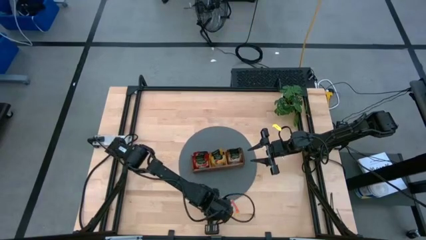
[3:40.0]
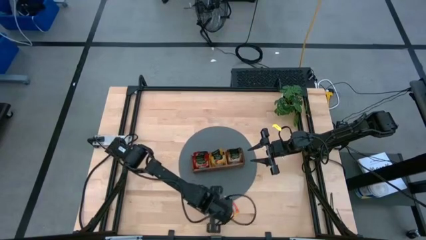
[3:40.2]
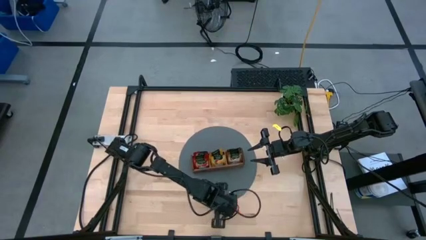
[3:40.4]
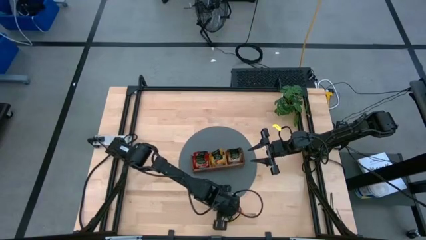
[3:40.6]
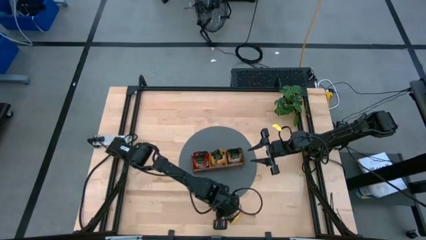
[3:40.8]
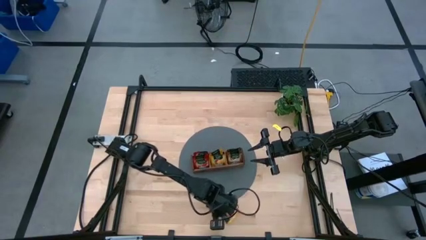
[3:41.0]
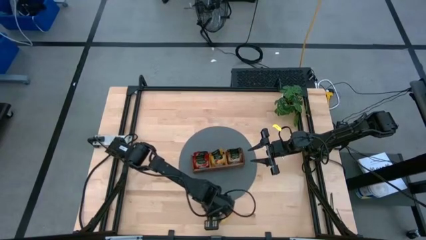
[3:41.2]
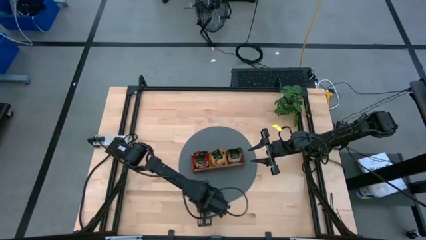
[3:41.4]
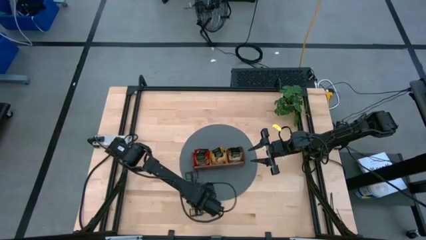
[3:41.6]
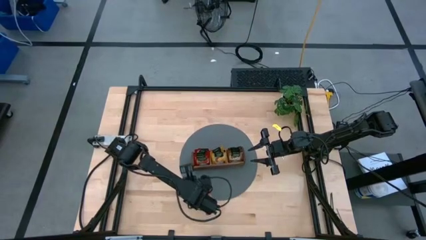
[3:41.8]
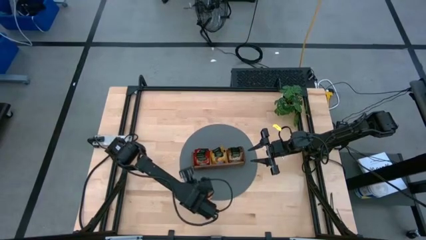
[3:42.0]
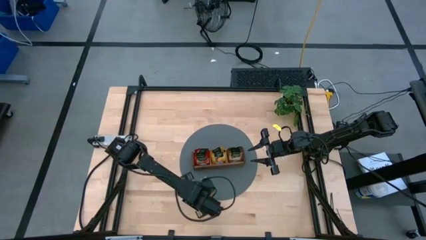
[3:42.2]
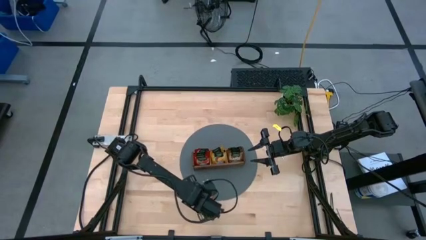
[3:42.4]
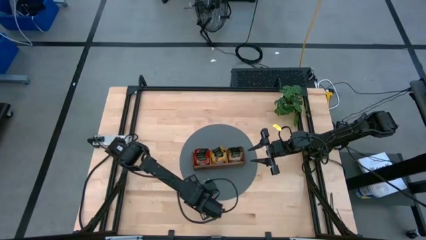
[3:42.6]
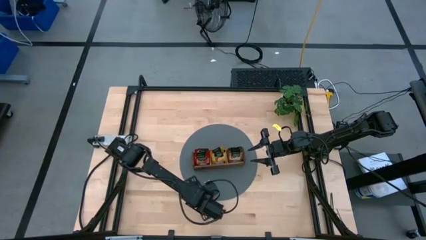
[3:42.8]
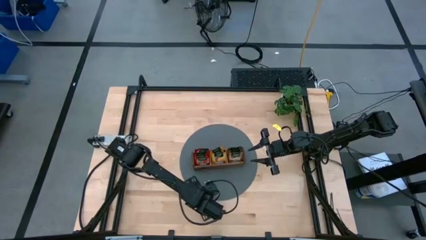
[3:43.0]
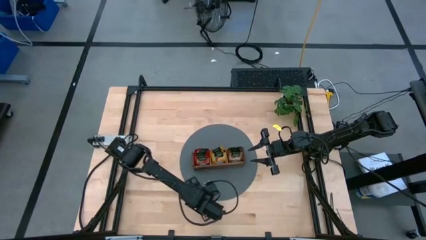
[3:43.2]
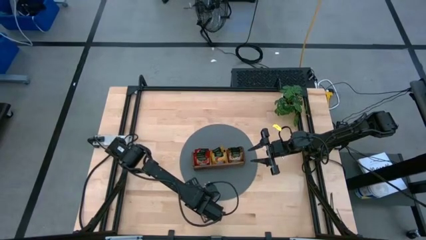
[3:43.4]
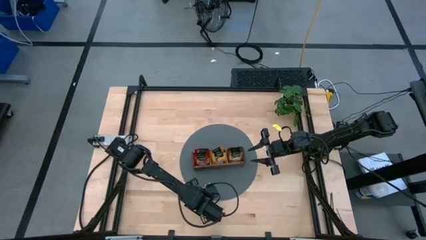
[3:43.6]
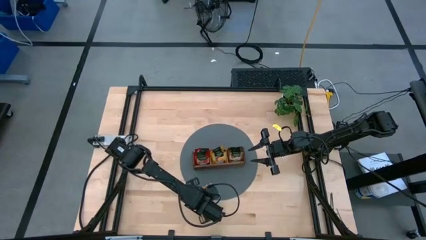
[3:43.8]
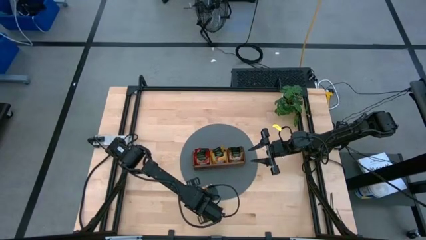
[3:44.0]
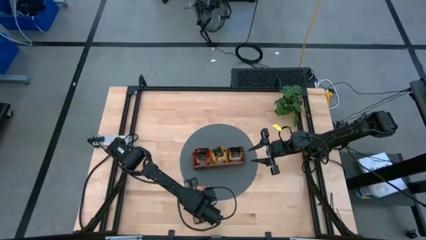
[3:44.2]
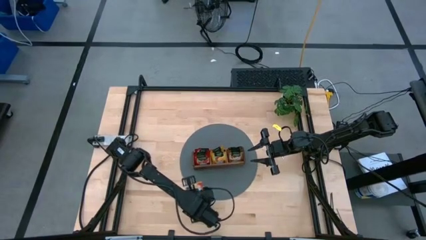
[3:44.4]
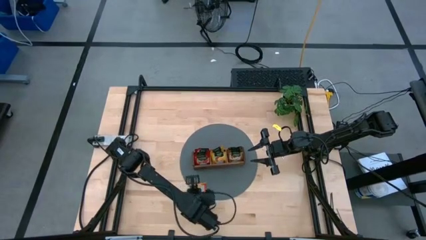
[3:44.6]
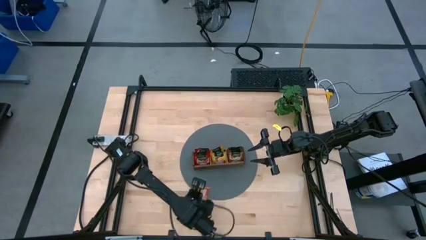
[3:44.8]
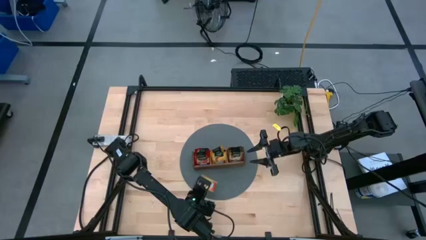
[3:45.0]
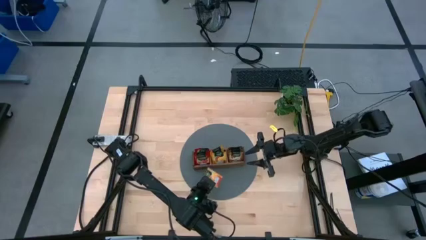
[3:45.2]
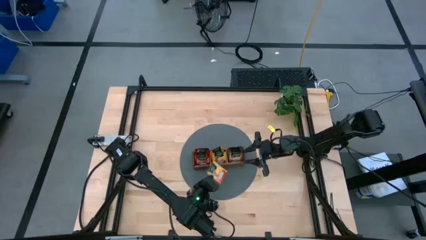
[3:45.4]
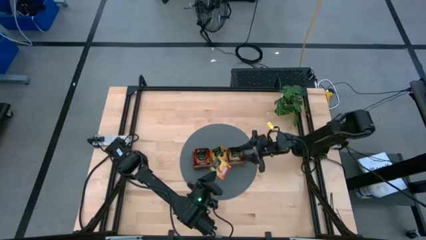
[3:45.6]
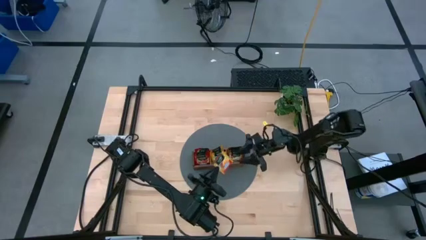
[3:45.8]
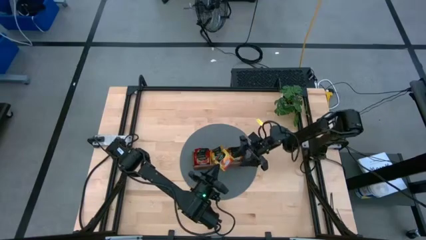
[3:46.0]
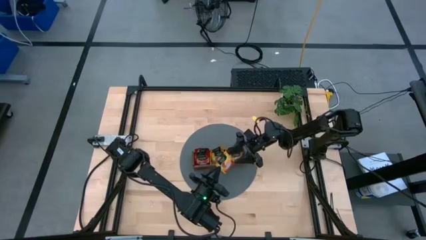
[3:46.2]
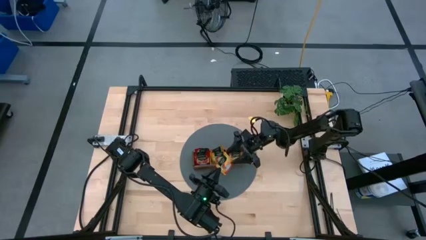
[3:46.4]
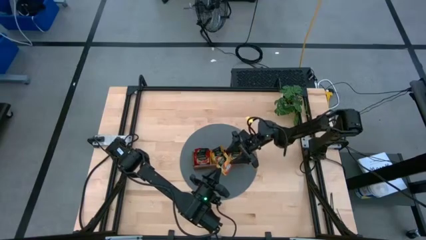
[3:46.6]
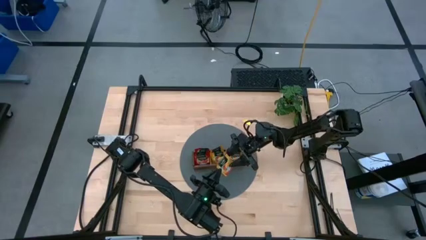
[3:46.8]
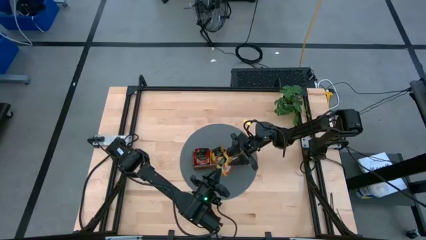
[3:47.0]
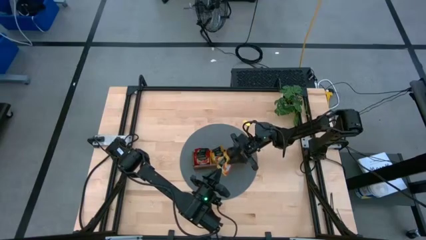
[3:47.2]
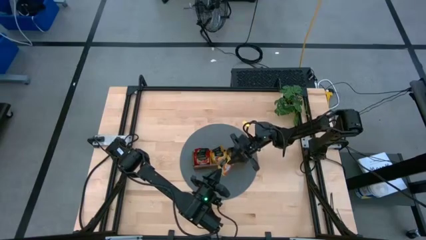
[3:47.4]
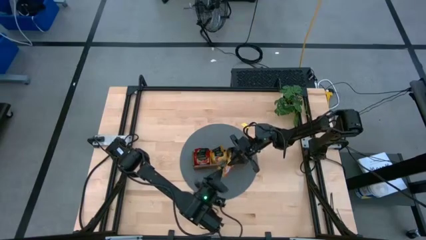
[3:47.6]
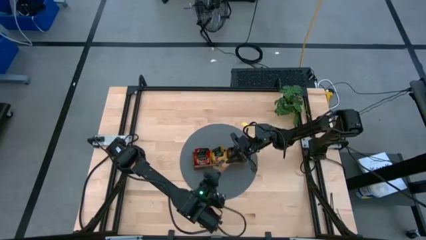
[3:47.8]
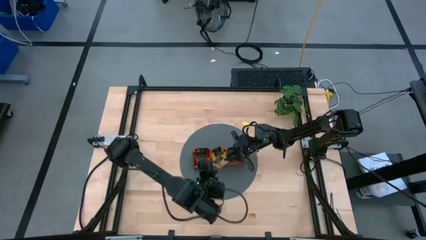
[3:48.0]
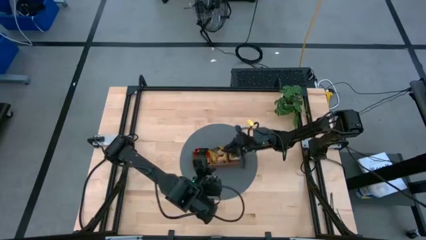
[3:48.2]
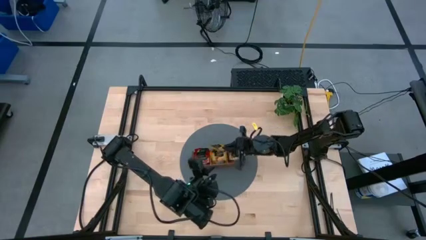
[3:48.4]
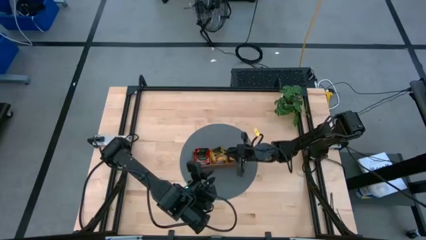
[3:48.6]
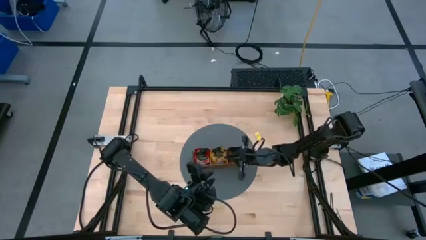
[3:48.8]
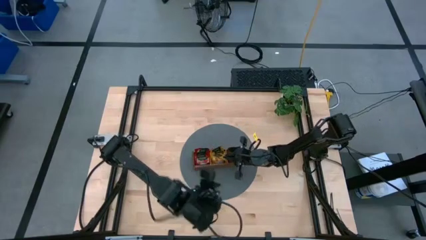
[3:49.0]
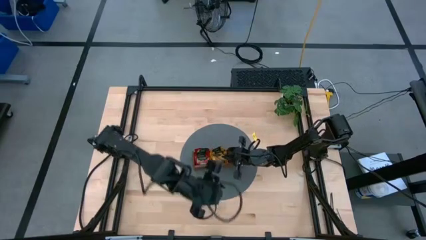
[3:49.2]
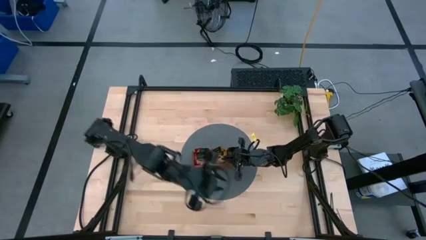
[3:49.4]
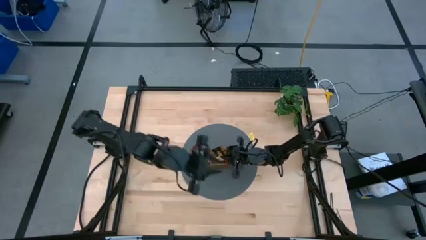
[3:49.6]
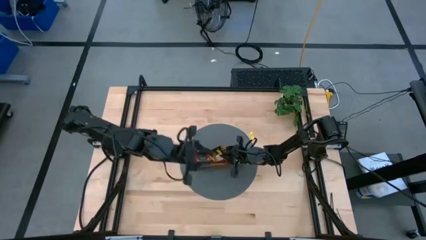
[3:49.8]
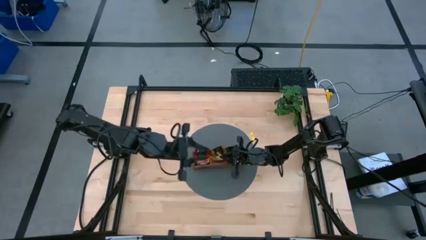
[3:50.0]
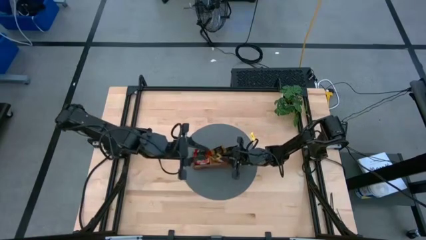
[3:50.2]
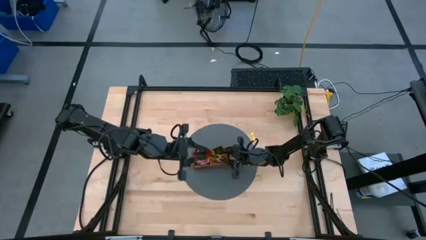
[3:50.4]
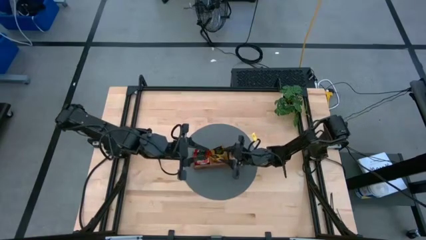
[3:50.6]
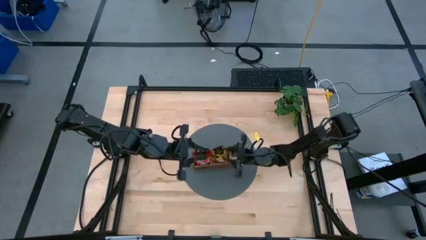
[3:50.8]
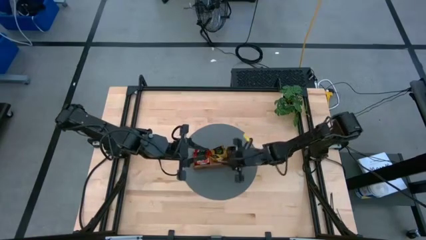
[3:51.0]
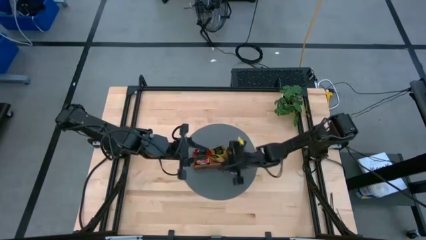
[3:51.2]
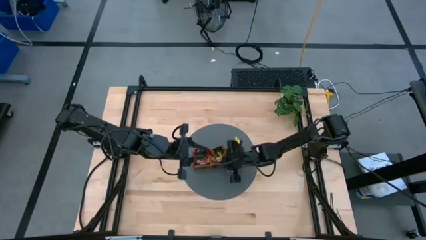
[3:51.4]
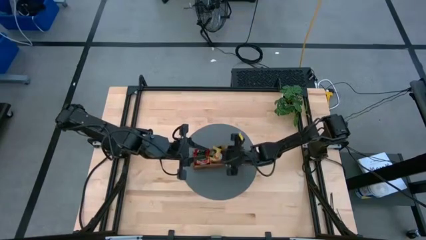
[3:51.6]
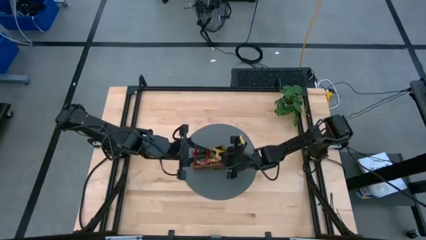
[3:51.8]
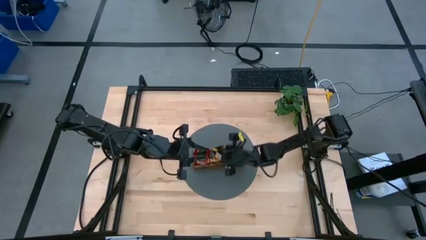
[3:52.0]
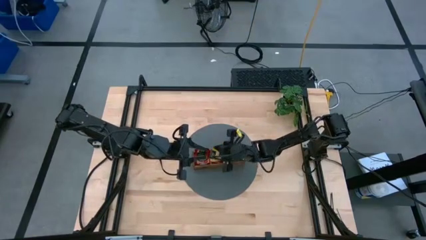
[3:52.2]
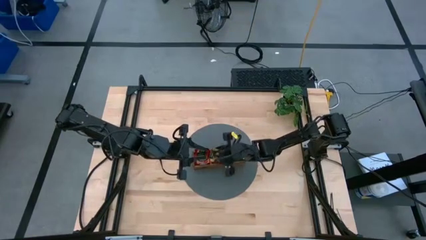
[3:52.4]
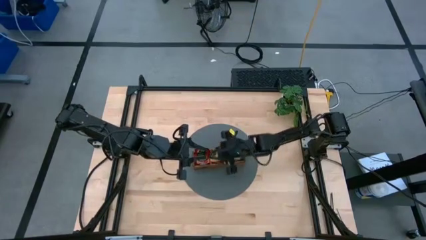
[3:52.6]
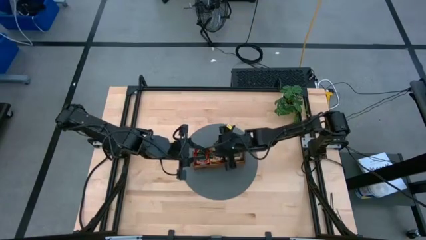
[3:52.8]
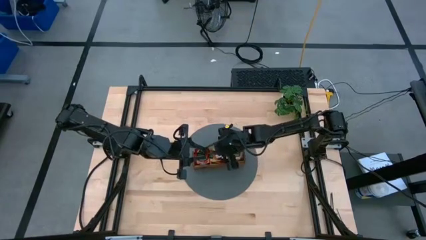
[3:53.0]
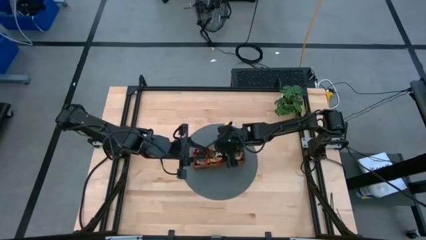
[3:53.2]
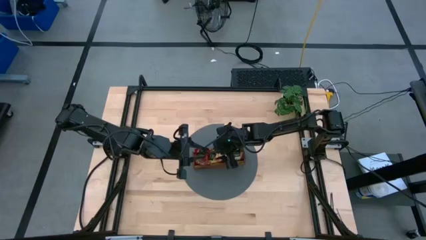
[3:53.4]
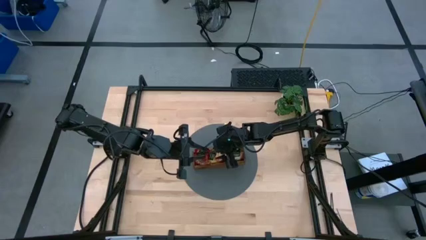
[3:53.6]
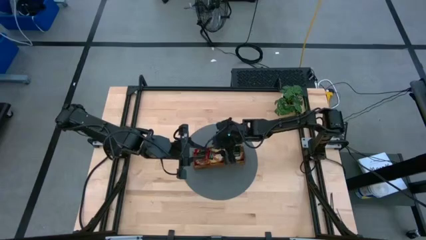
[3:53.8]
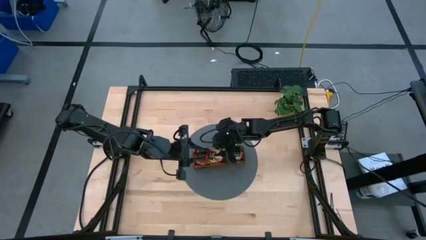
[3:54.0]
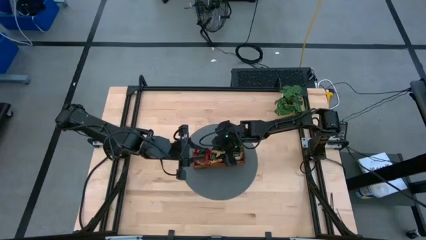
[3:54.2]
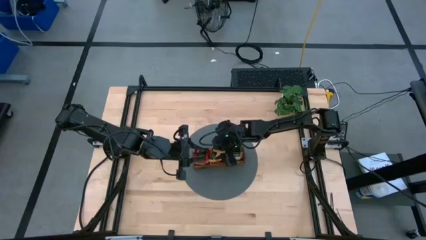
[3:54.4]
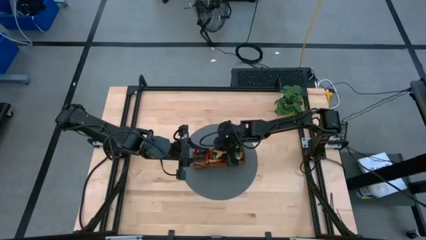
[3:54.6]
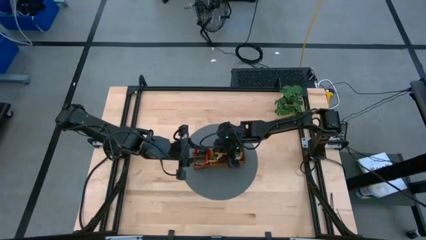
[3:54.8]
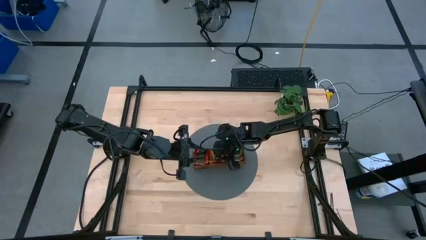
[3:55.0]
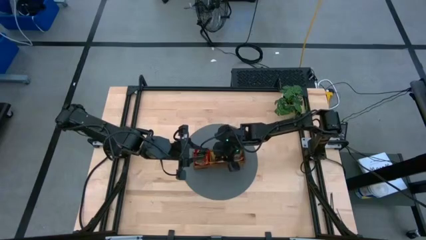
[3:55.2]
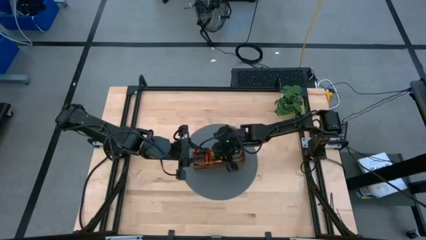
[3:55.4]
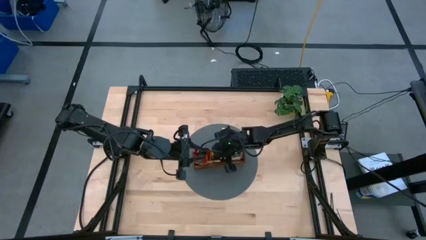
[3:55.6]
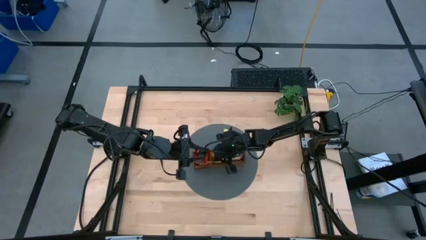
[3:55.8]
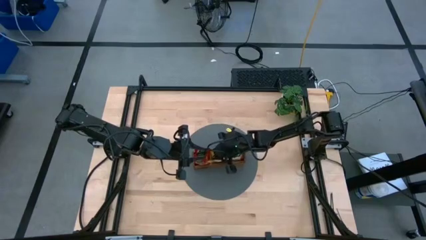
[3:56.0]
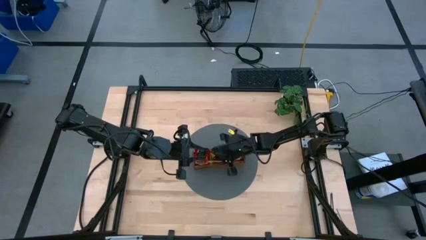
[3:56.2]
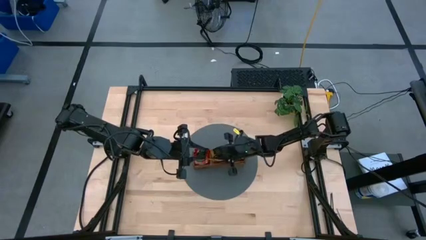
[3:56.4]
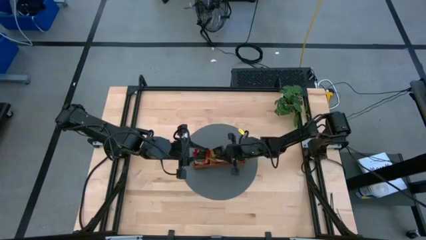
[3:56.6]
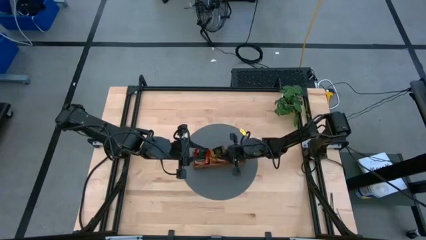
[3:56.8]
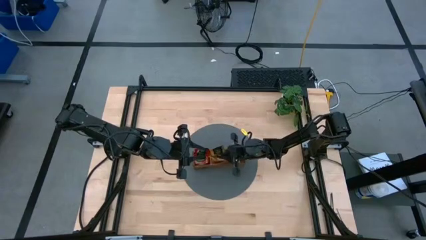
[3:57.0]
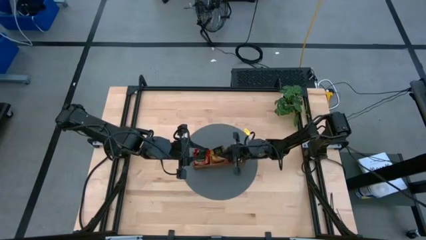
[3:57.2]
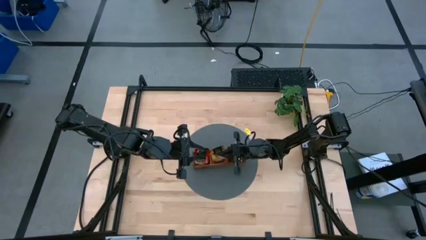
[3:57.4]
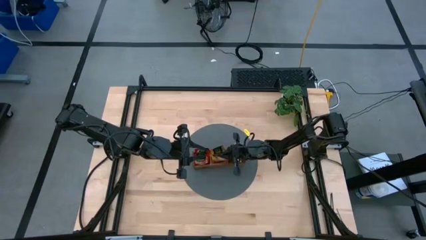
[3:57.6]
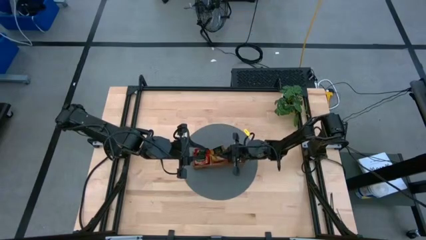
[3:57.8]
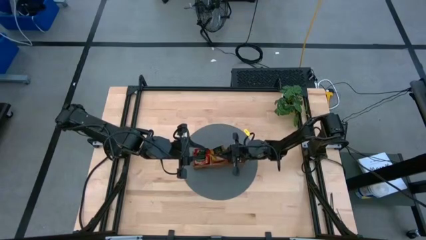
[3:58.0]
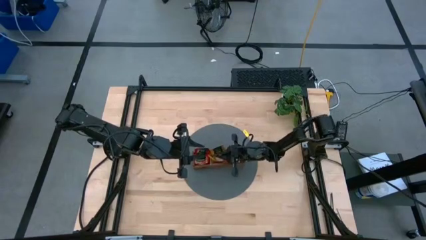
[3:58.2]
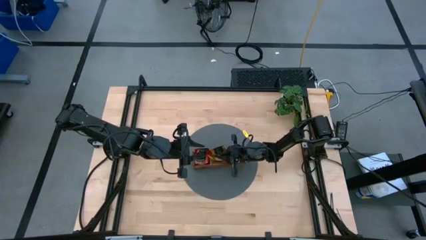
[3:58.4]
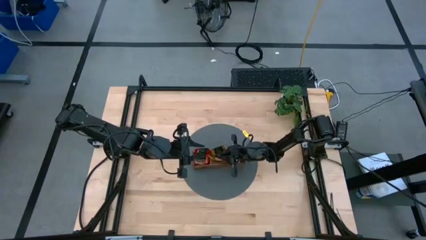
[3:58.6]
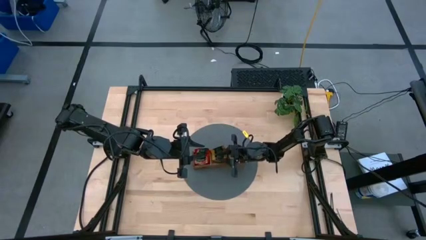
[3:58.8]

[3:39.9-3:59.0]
Task: Pick & Place Tea
Put the yellow tea bag into the middle section of the wooden organizer
